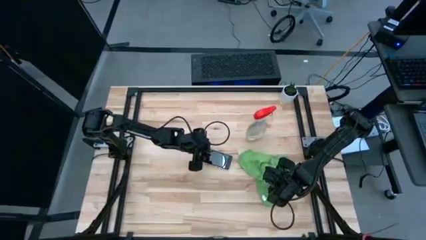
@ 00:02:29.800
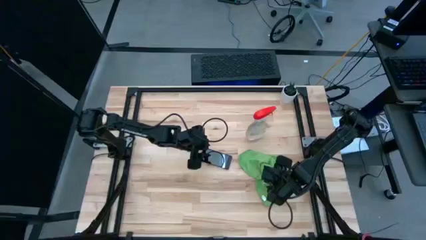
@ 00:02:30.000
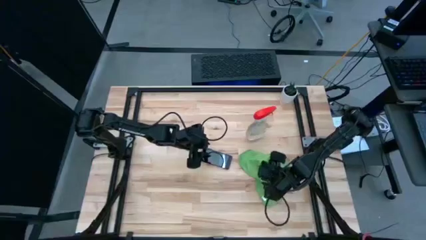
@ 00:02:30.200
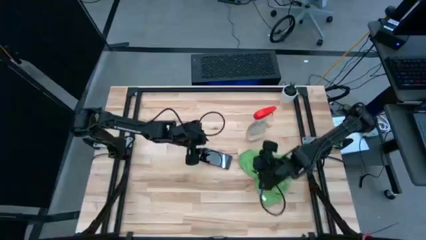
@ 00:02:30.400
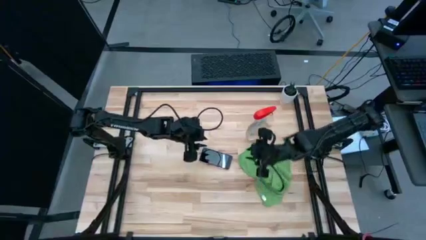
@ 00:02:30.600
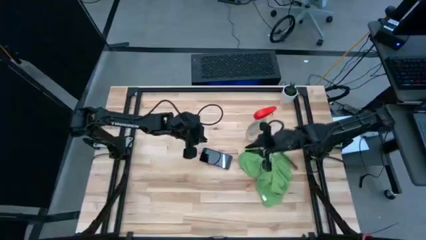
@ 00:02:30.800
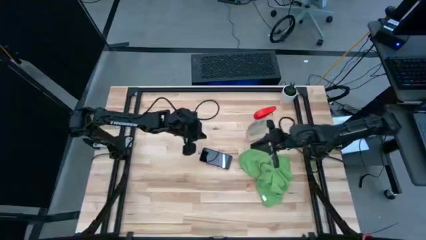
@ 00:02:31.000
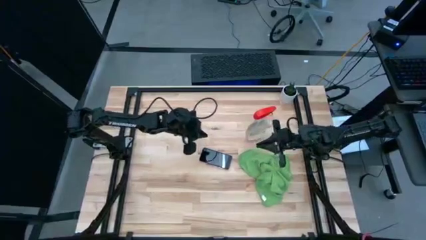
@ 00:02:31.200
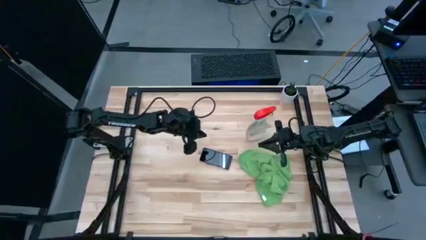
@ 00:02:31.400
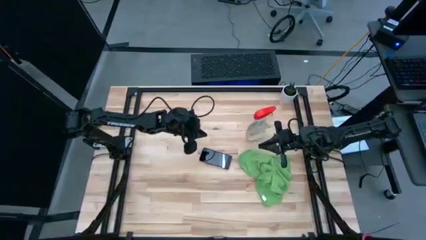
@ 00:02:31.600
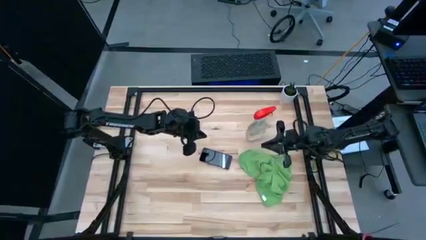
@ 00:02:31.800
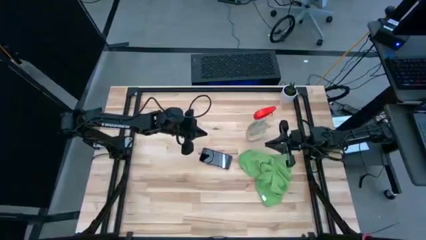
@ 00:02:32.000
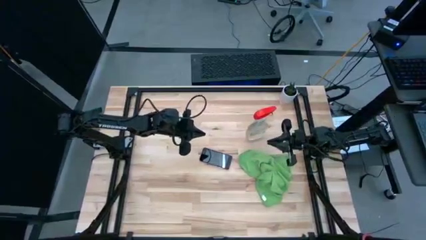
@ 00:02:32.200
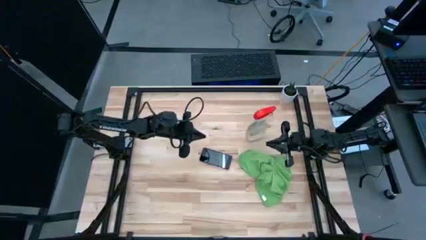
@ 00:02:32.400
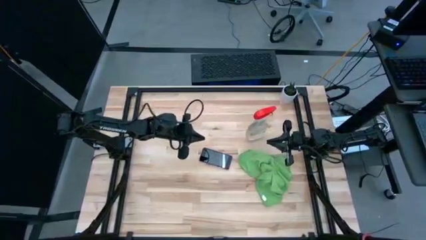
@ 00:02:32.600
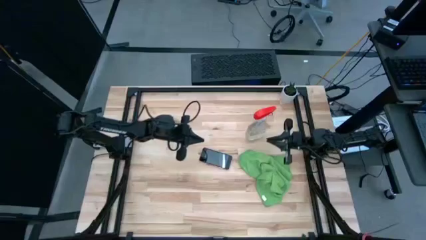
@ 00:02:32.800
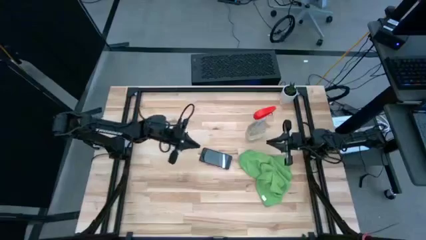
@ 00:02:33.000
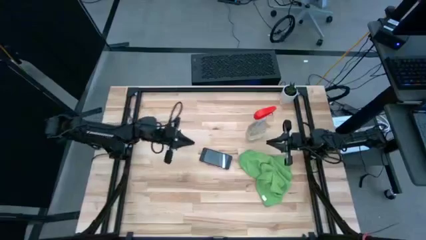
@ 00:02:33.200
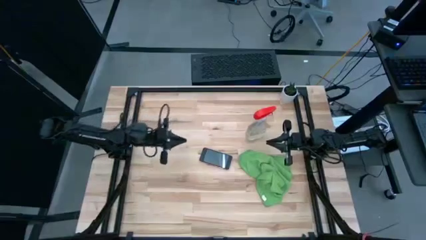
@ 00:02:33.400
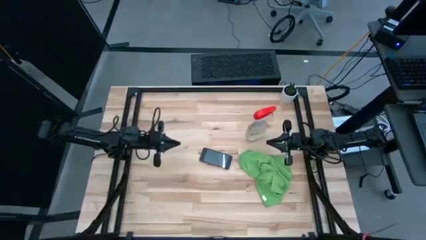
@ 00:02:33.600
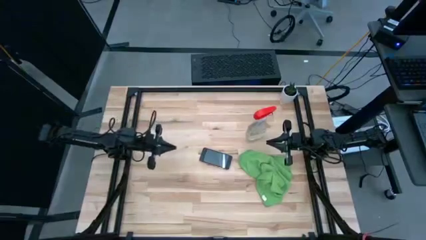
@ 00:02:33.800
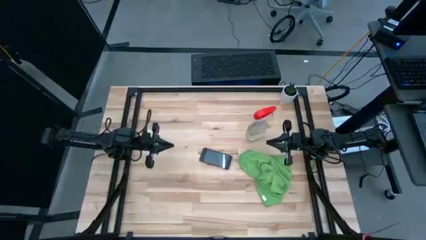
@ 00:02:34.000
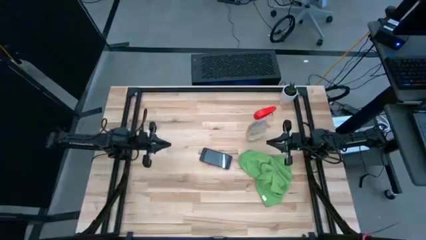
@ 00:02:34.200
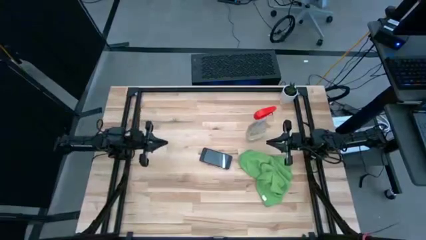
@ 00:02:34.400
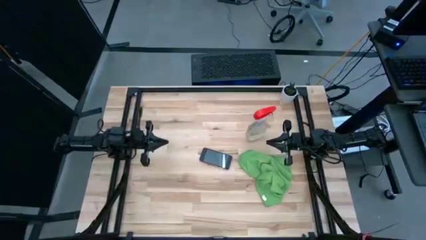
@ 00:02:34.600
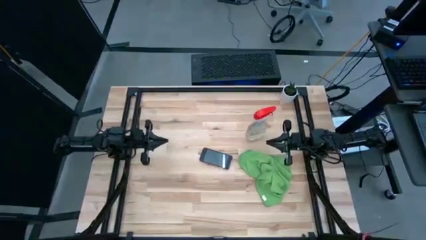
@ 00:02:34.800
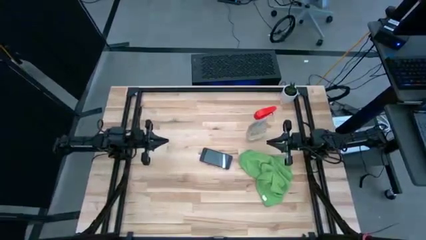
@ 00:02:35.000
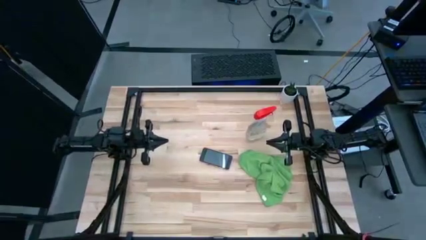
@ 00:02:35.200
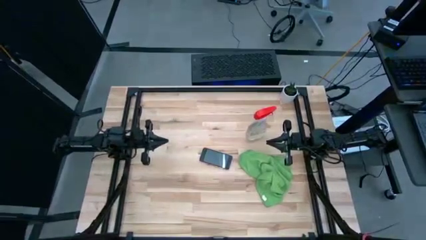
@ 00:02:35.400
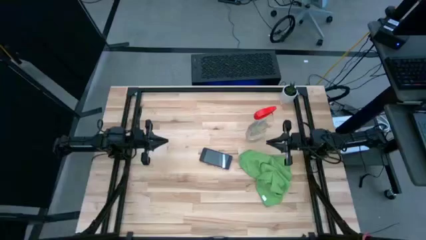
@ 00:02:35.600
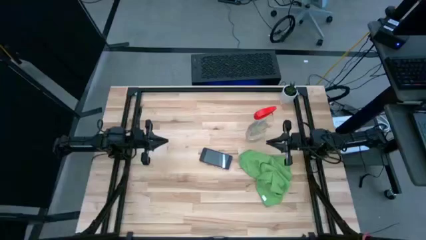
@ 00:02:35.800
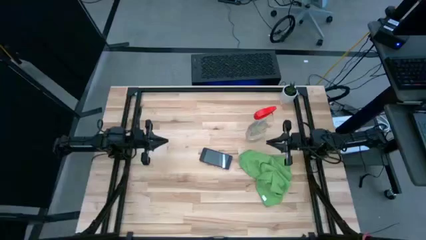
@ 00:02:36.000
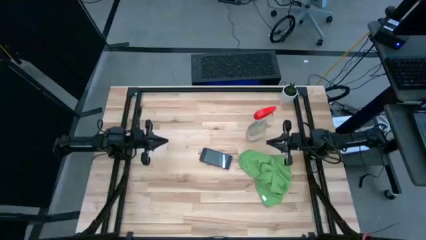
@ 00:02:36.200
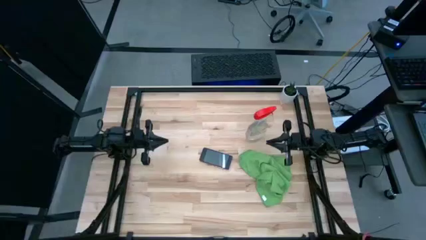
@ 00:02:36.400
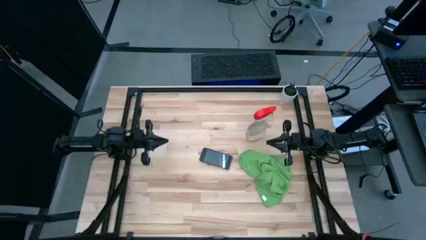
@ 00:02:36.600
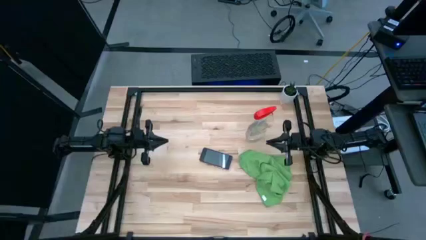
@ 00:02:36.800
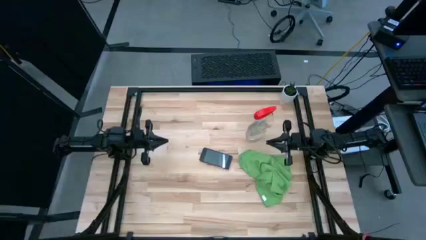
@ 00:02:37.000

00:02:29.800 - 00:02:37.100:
Task: Apply microfiber cloth
Return to Home Position

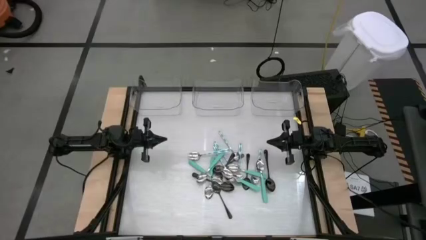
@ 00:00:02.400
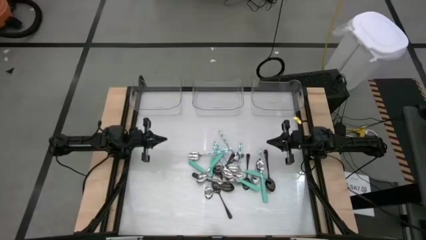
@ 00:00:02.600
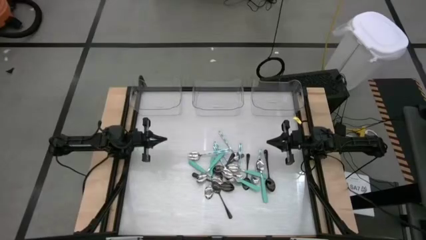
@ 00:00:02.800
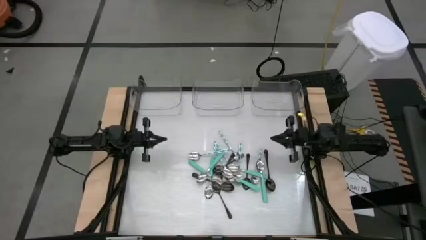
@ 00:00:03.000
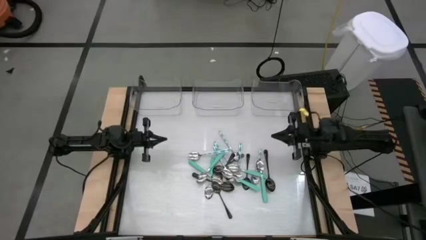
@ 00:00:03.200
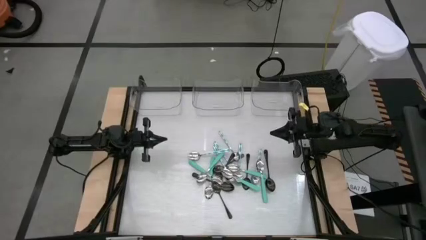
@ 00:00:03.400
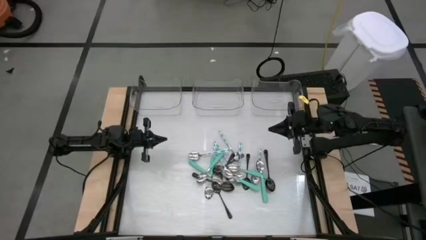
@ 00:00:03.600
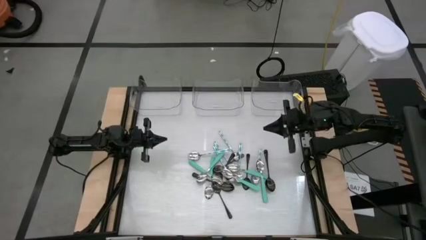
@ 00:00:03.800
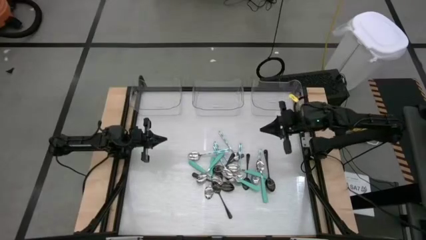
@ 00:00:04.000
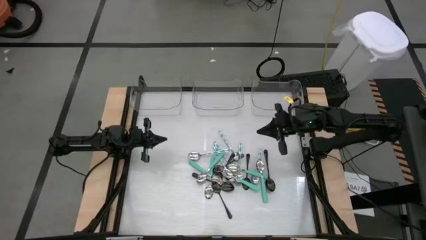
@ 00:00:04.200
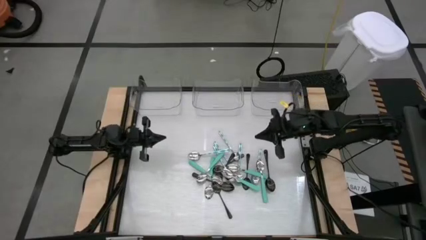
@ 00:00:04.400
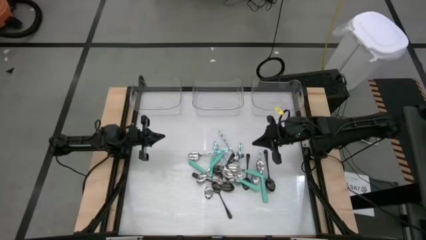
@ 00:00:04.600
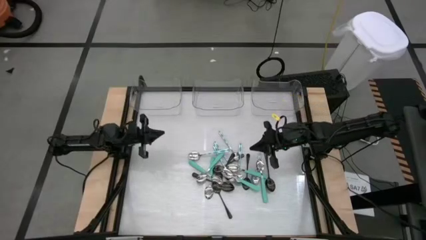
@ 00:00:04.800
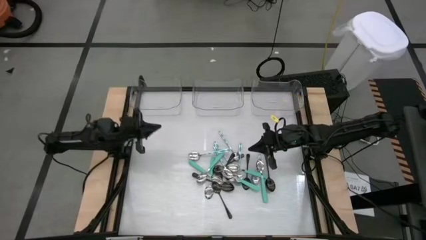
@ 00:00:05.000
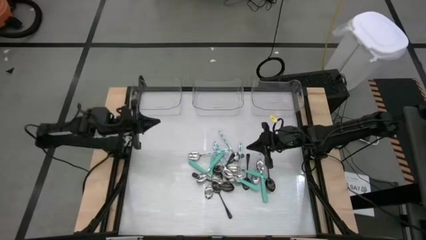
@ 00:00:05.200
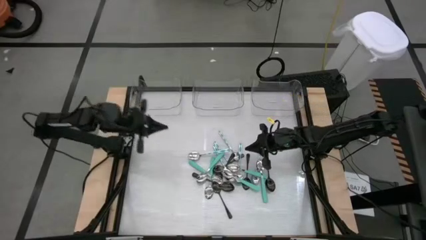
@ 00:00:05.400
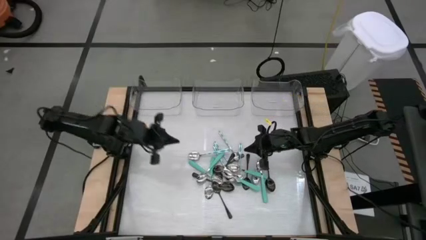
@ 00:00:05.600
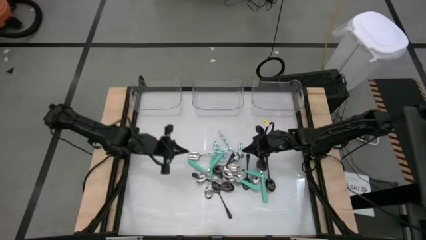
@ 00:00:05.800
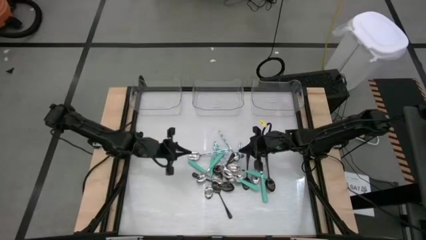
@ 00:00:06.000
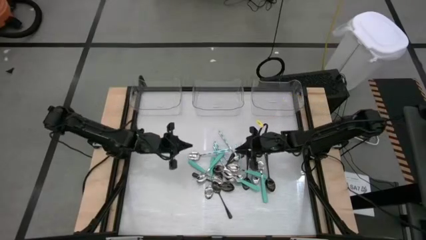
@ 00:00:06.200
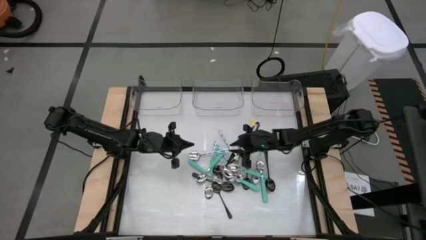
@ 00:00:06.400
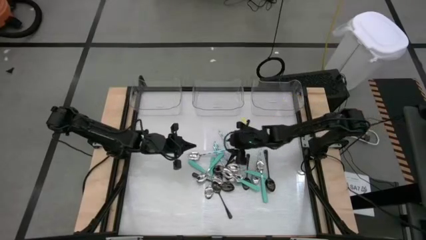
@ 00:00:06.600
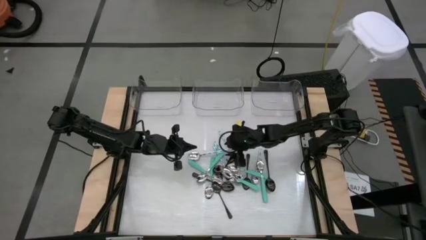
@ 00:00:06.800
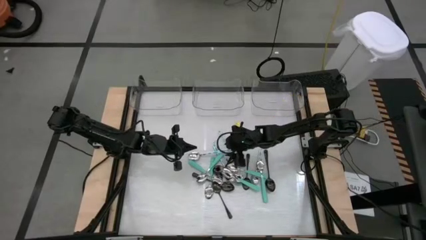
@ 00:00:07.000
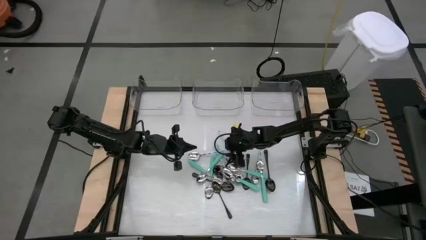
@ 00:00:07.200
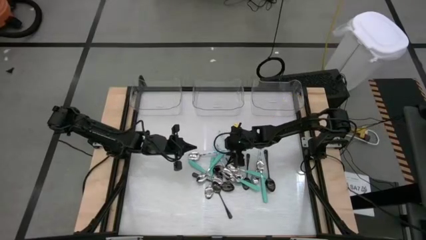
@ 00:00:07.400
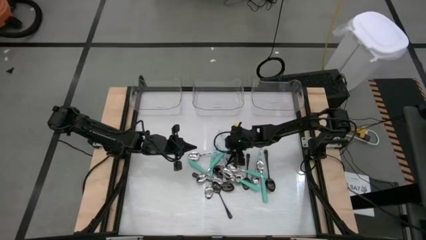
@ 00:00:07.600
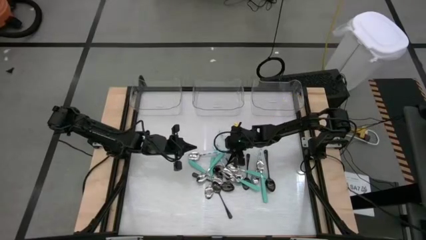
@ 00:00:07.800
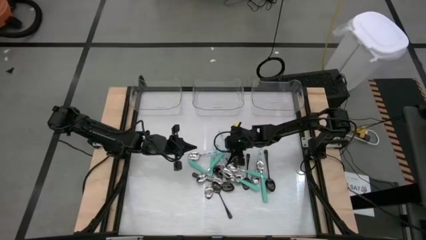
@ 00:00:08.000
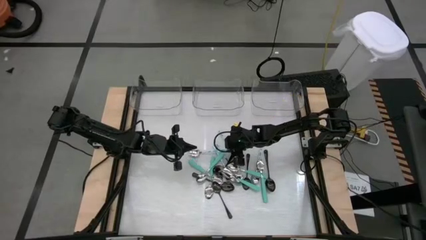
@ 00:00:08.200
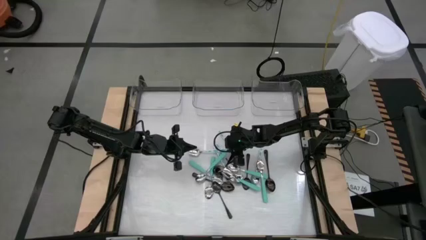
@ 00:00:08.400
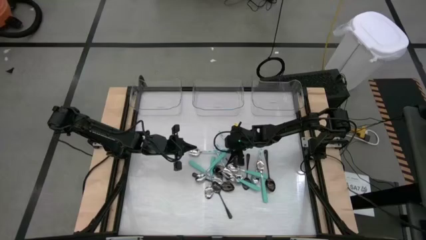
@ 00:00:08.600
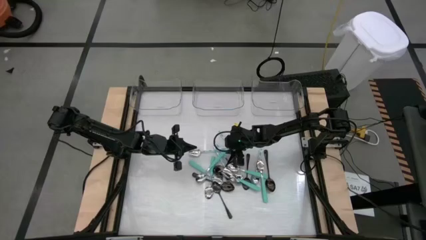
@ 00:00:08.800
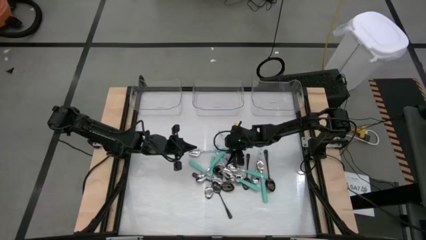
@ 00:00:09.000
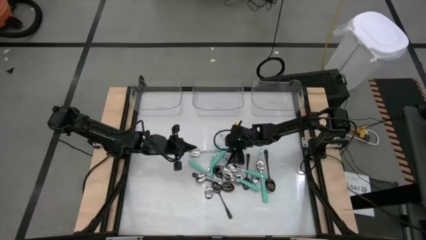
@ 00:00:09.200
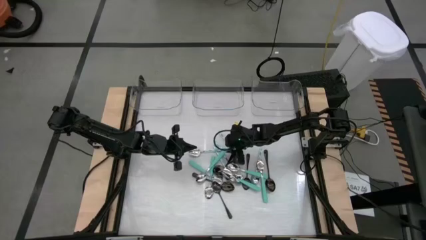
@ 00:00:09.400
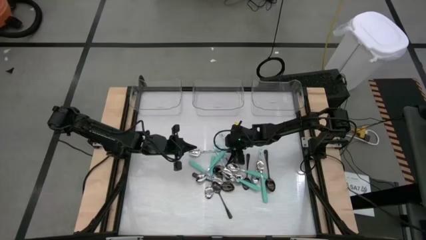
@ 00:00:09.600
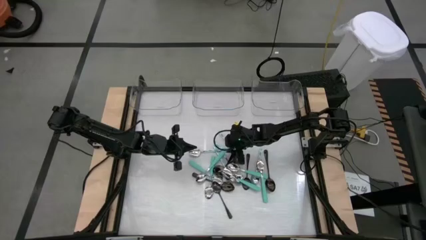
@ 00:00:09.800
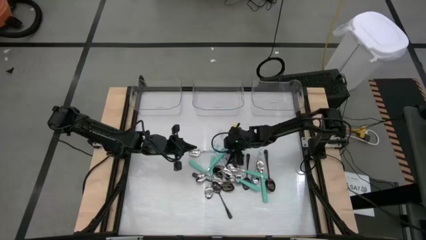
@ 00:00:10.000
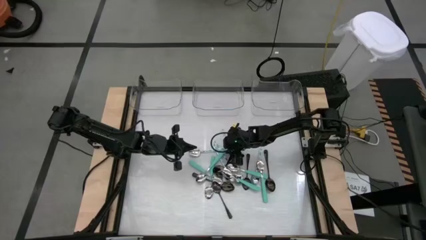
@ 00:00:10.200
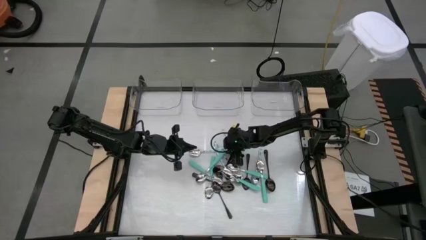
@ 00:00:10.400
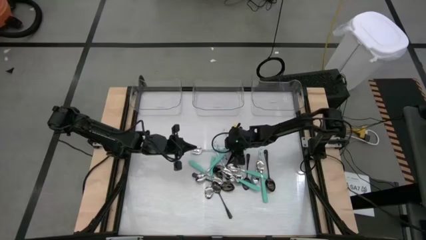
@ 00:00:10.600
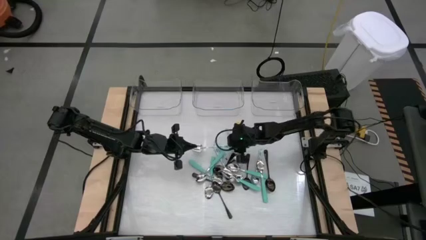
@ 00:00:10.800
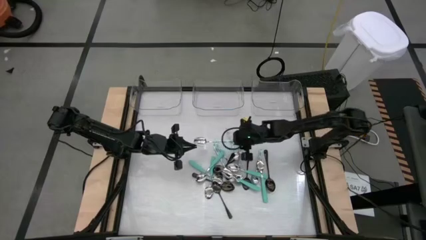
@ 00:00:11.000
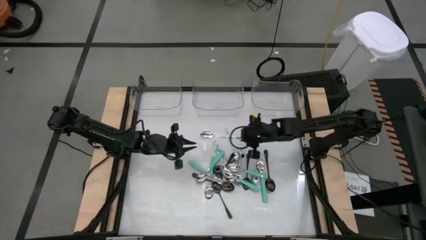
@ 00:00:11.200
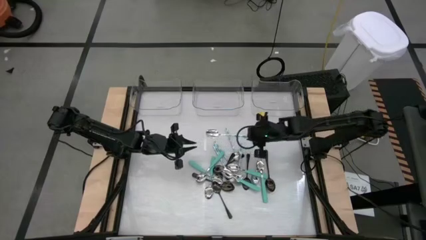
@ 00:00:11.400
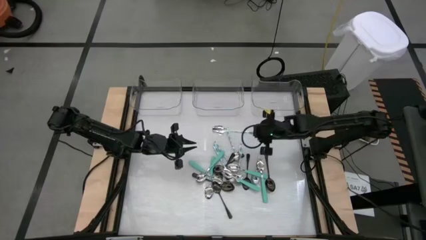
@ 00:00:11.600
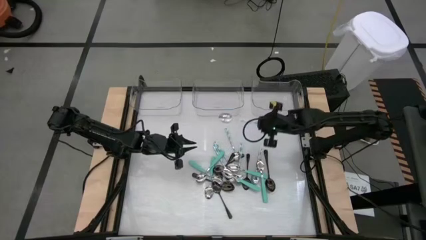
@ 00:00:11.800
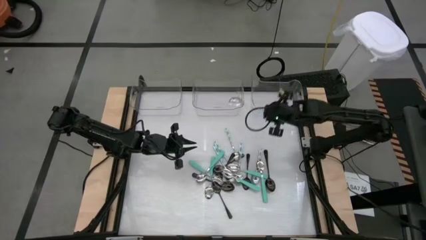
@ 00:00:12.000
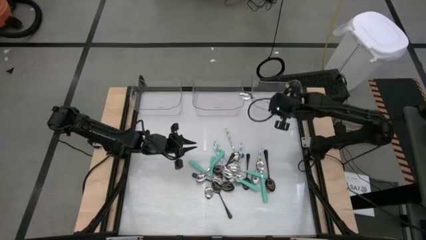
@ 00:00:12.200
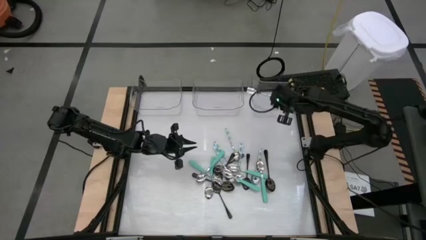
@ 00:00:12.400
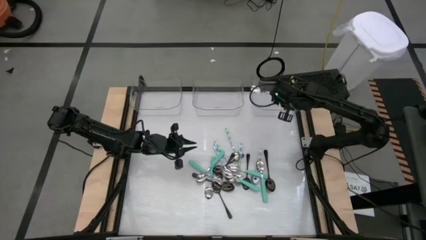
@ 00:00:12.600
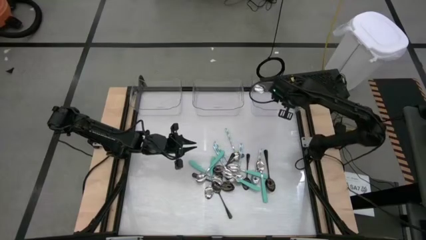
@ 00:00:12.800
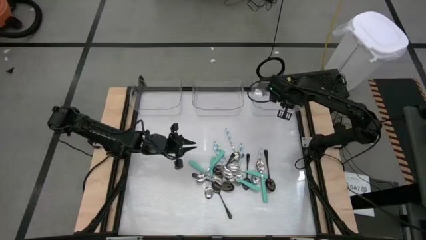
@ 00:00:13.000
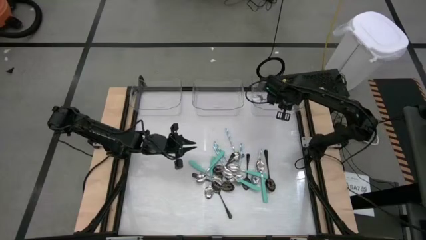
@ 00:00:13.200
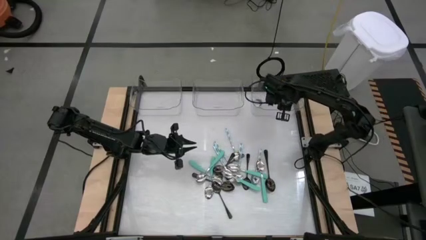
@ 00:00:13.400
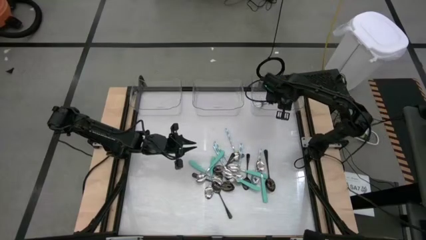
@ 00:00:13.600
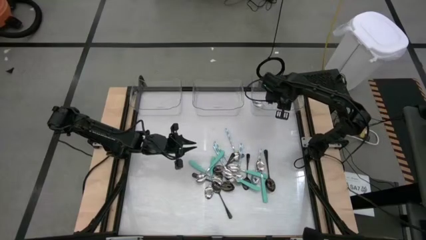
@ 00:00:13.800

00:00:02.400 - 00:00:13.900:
Task: Sort silverware by color (type)
Put the green patterned spoon into the right transparent bin
